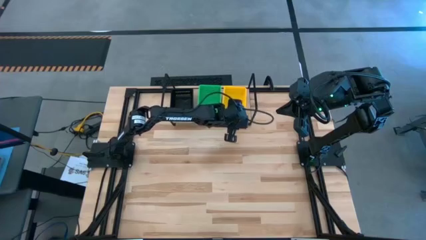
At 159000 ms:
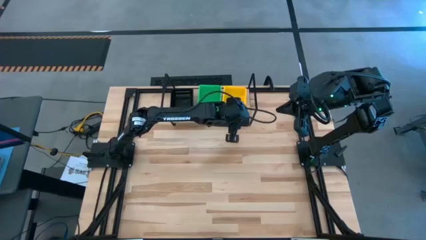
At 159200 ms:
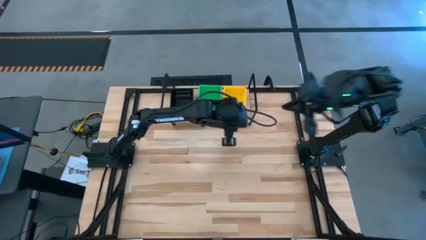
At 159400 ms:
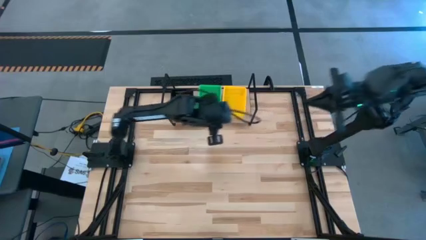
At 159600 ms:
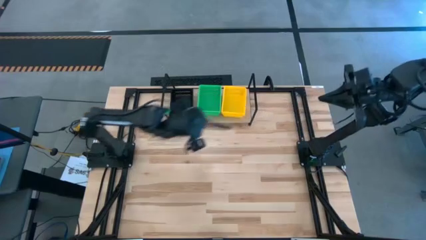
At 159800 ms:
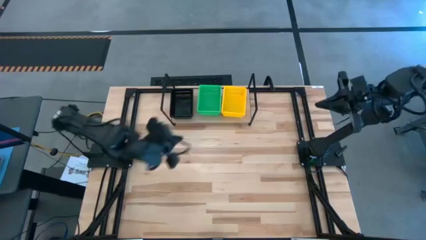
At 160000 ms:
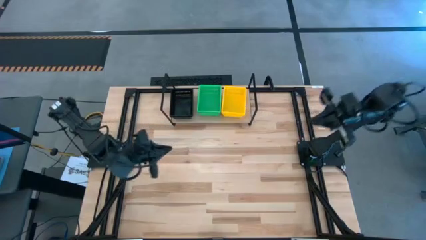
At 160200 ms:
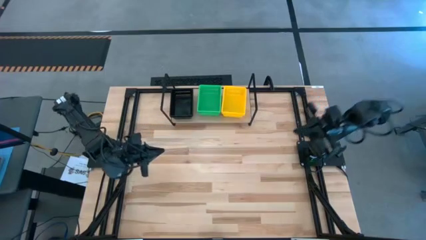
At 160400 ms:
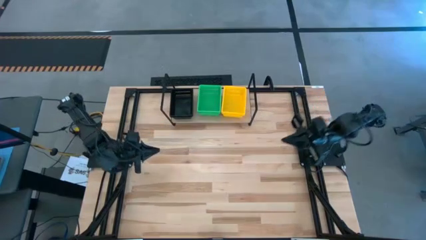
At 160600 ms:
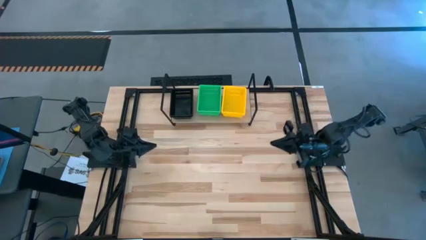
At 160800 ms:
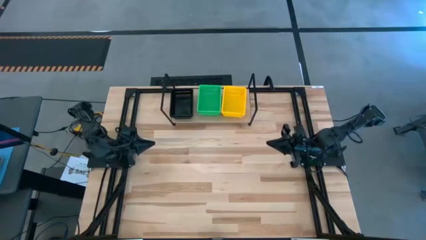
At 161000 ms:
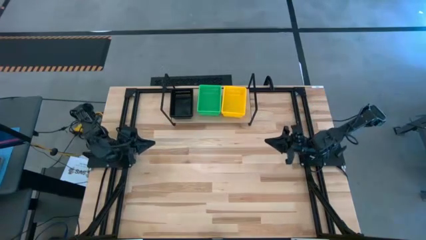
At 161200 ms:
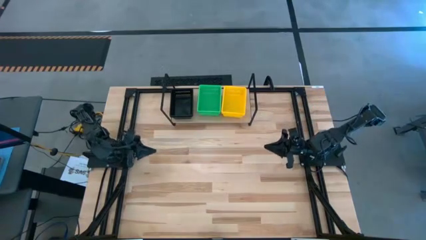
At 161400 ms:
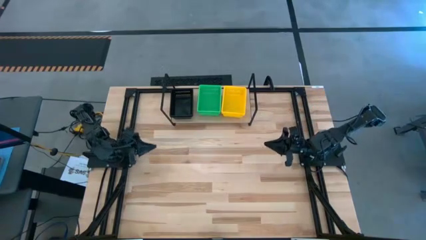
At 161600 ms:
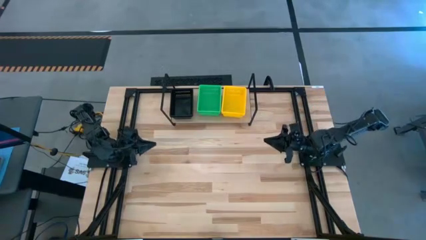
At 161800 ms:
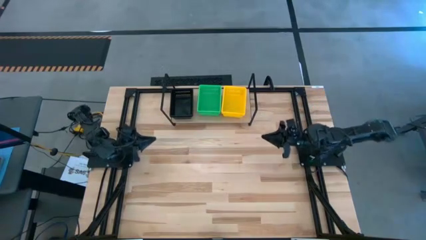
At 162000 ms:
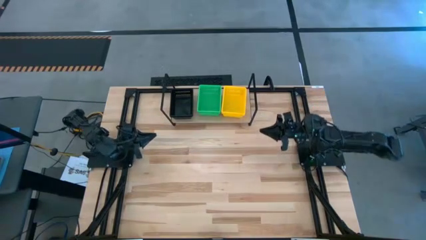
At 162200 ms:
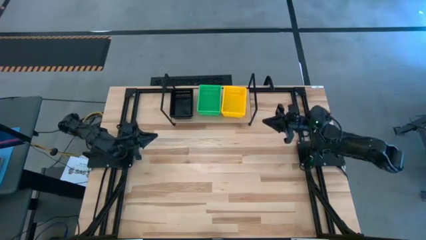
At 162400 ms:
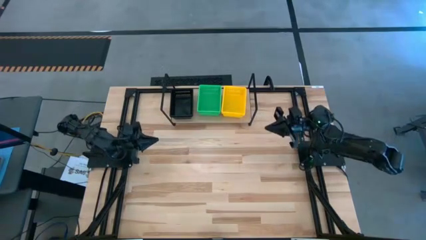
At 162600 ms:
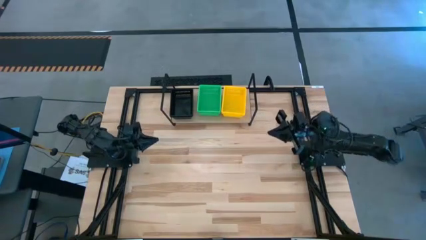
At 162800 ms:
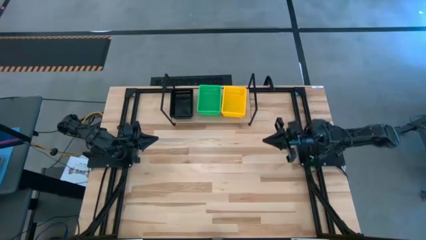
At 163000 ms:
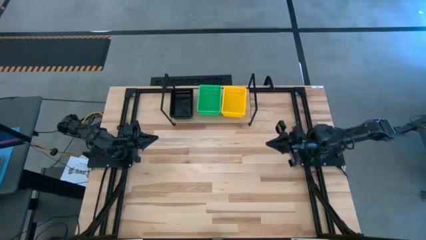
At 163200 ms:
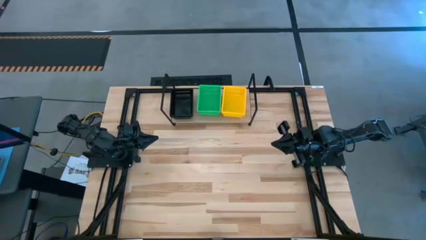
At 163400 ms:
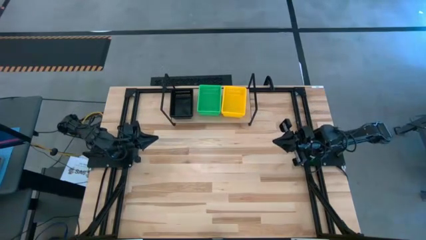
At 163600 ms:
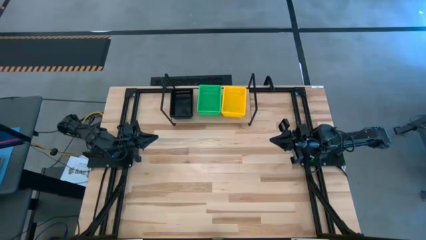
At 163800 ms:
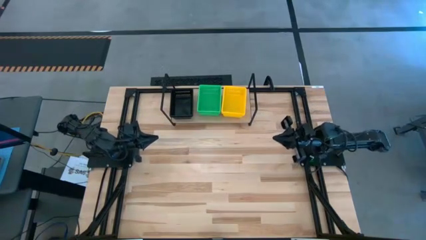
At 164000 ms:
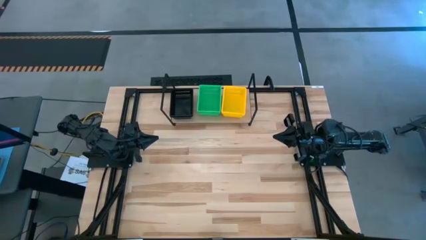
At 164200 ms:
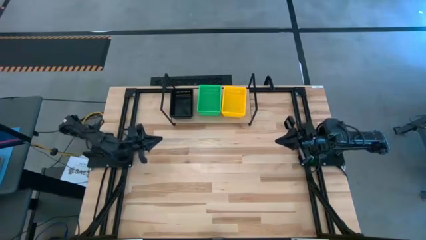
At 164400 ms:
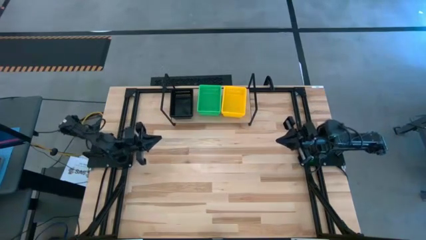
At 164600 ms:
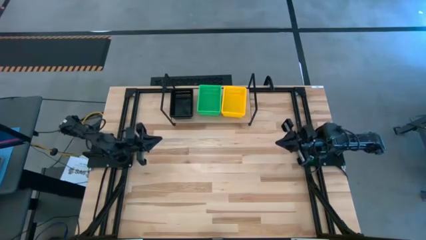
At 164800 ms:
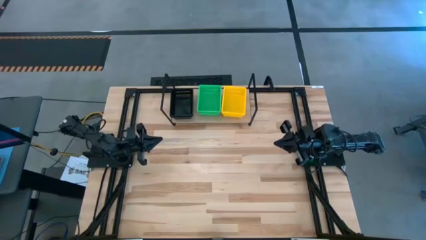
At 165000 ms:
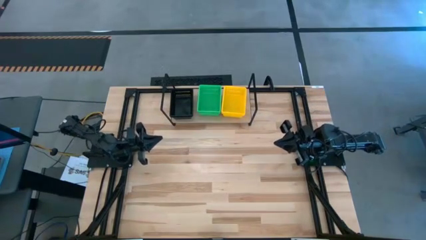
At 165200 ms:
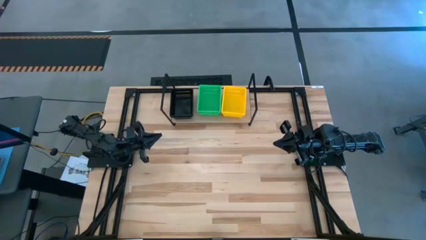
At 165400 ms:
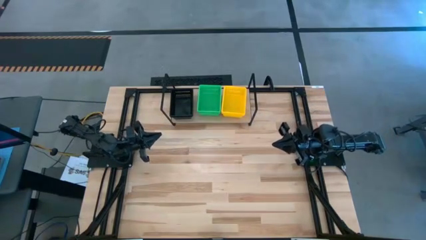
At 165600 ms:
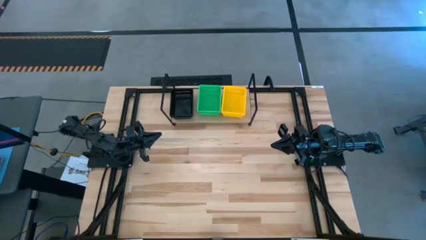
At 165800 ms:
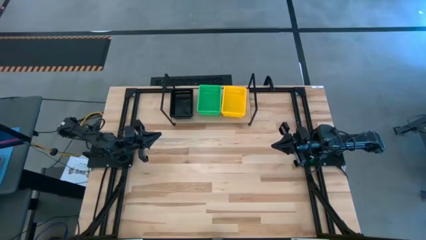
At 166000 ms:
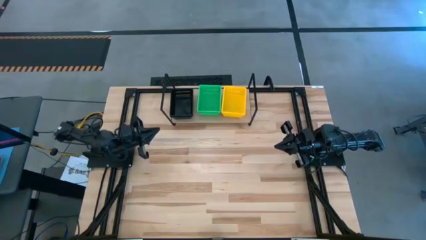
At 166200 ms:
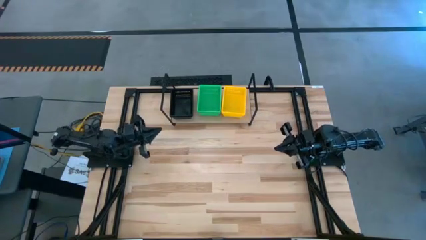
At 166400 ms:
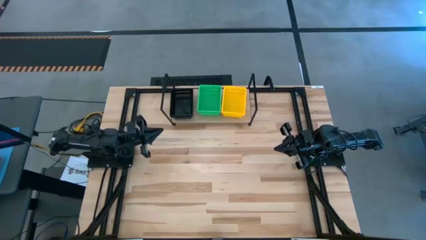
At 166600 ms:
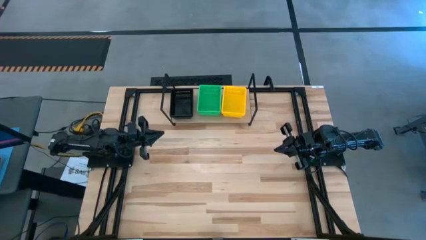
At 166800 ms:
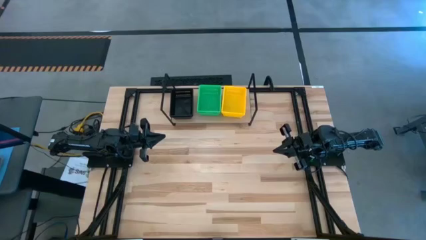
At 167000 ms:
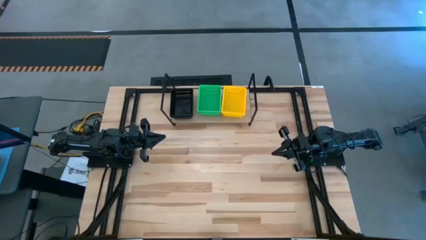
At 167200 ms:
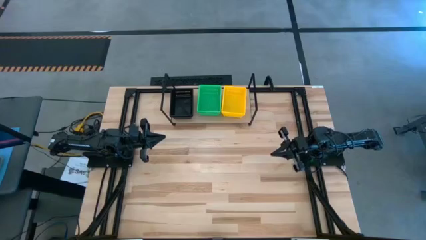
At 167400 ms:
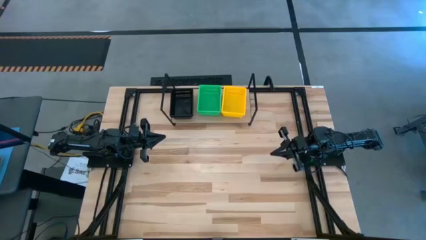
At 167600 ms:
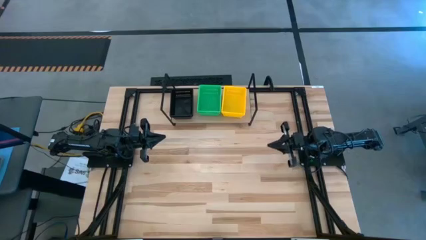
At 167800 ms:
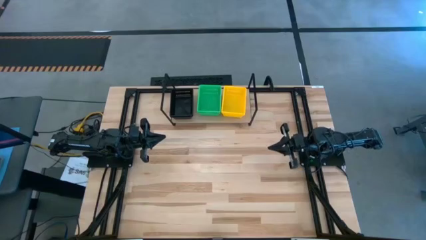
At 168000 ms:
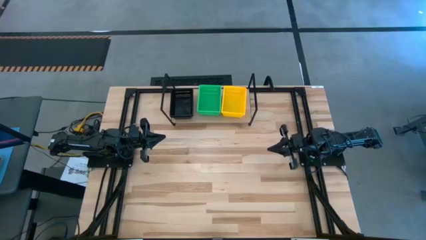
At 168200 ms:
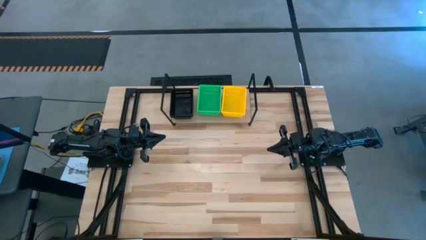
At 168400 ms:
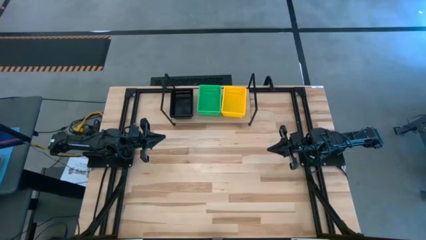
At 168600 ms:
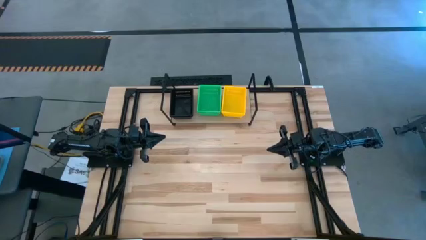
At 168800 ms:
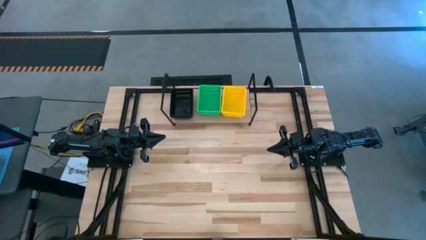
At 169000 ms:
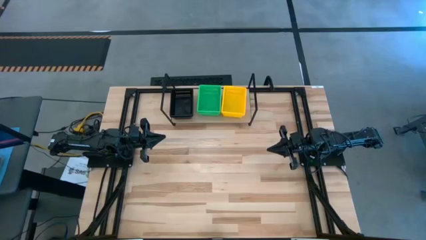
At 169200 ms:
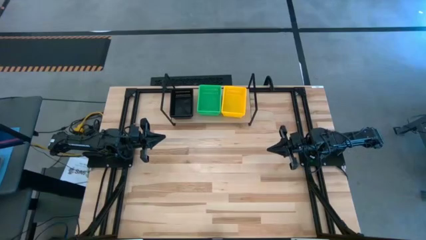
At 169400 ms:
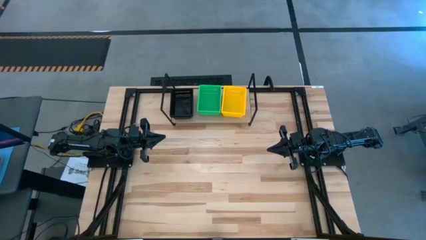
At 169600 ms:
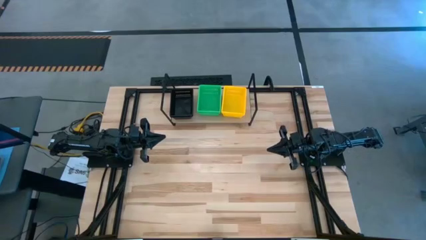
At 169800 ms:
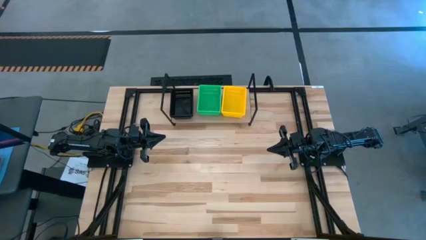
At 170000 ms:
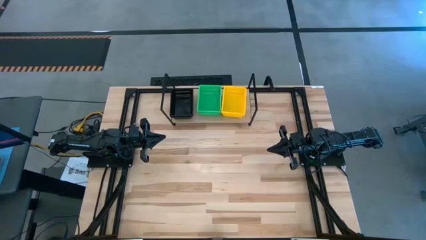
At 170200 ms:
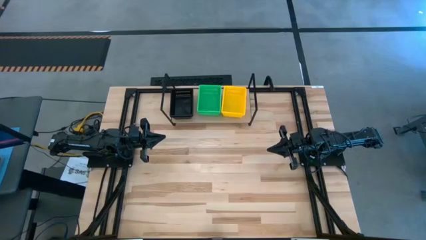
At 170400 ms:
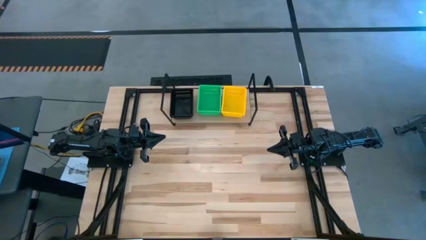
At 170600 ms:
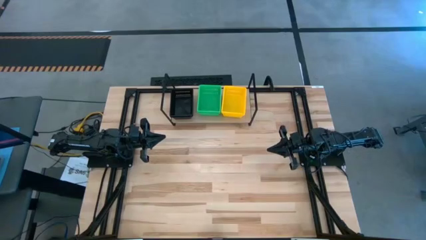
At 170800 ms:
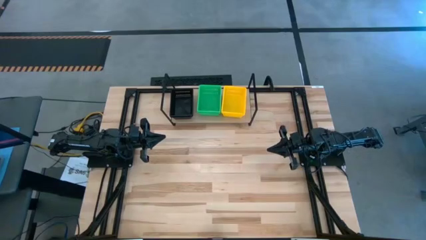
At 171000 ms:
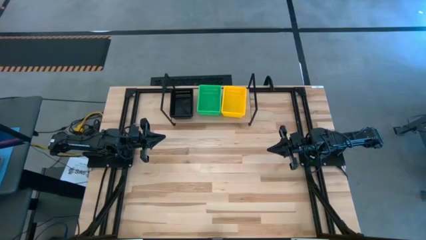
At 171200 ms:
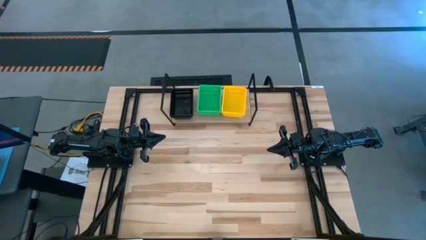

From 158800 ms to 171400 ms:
Task: Stack baskets on shelf by color
Return to Home Position
